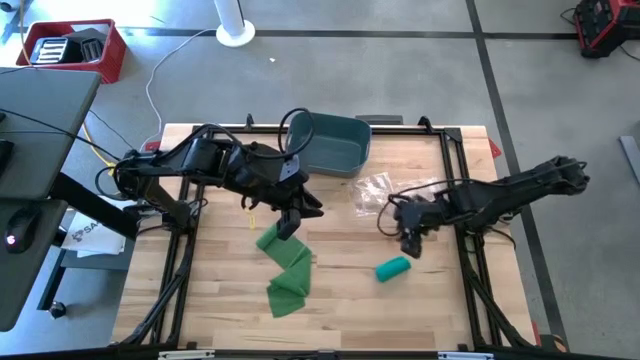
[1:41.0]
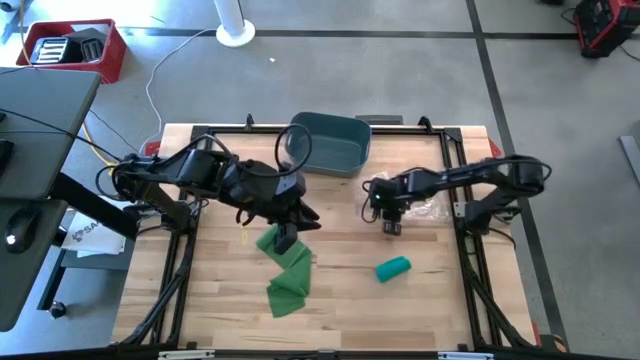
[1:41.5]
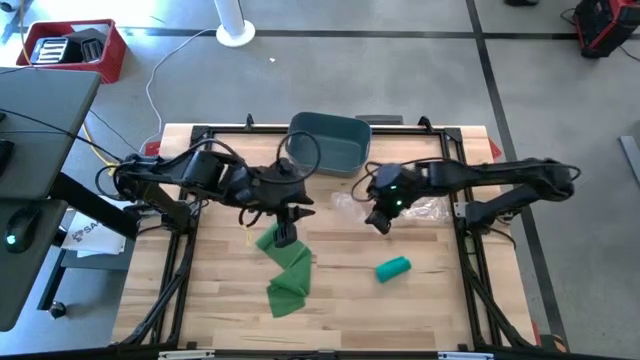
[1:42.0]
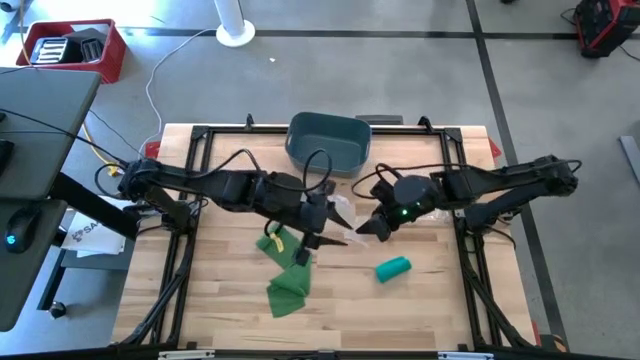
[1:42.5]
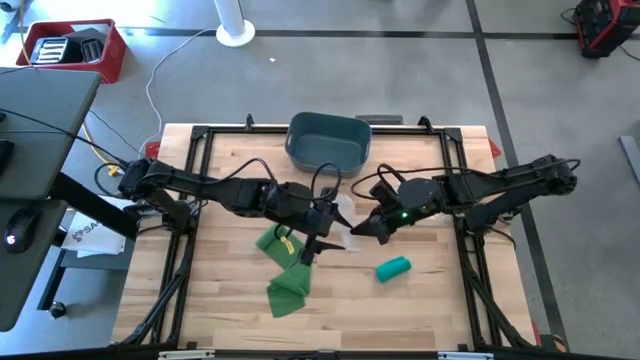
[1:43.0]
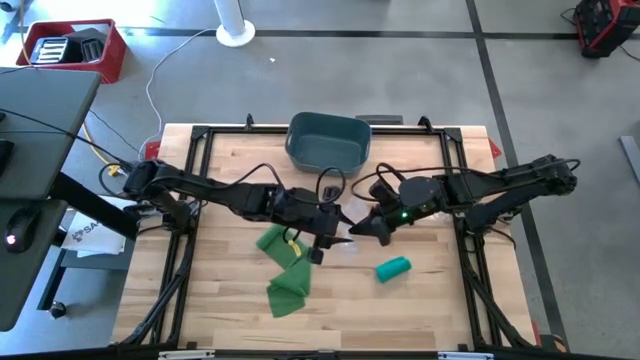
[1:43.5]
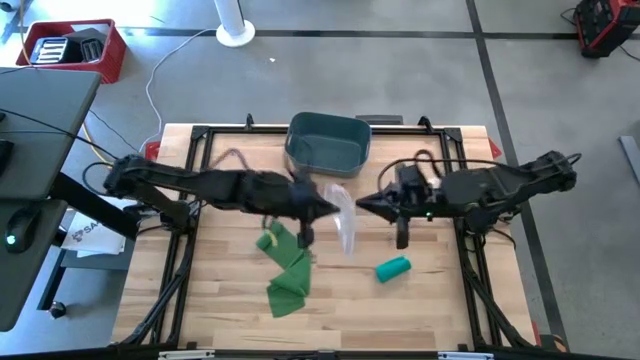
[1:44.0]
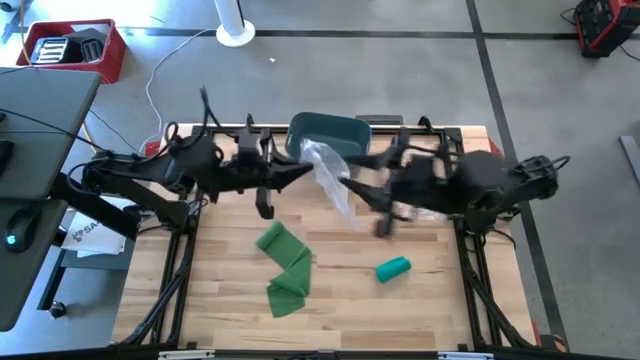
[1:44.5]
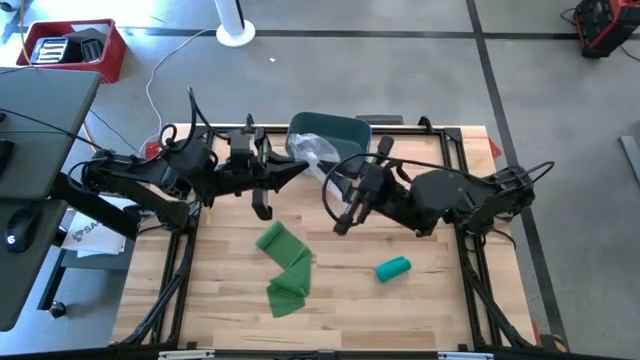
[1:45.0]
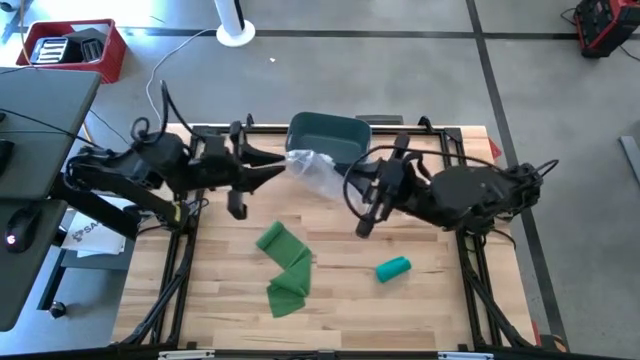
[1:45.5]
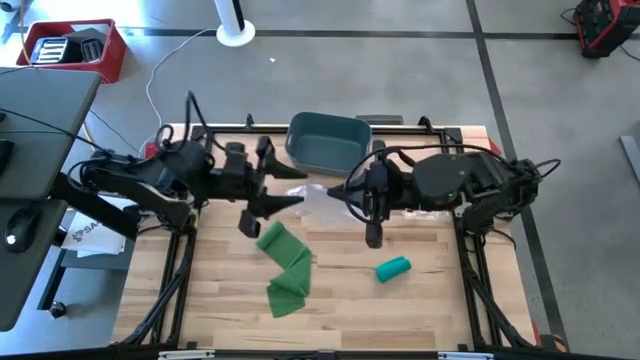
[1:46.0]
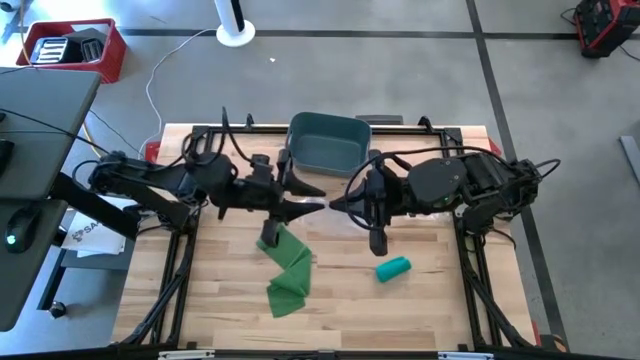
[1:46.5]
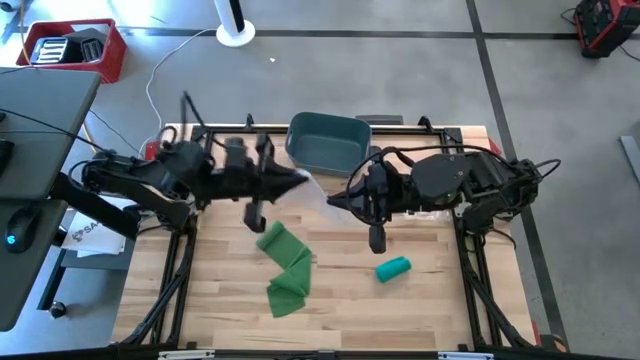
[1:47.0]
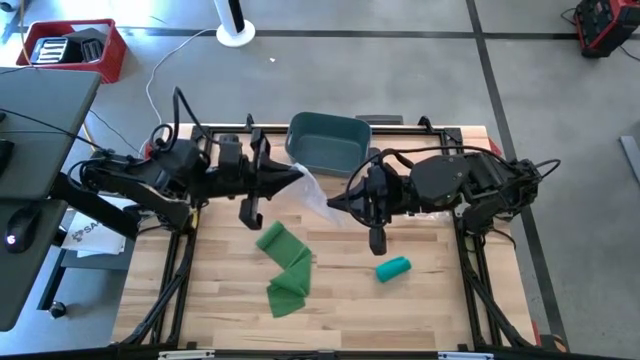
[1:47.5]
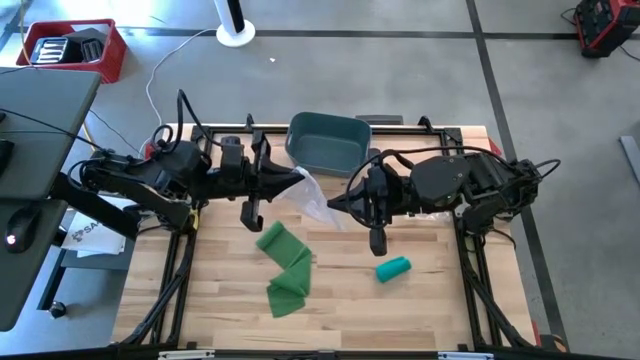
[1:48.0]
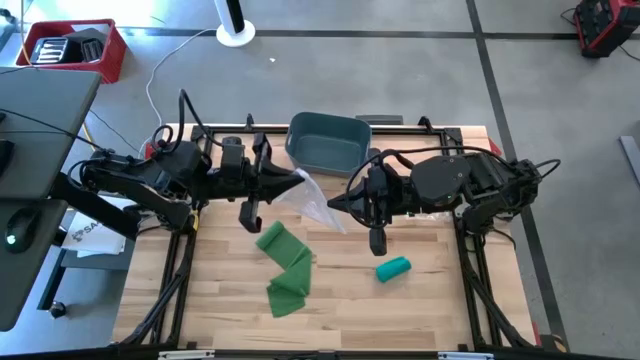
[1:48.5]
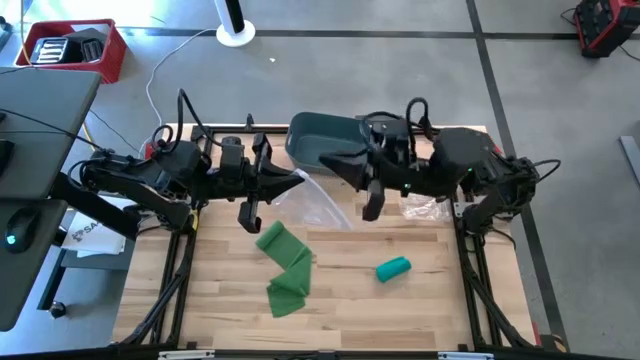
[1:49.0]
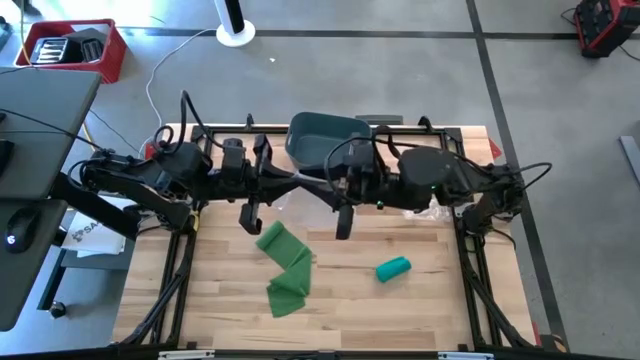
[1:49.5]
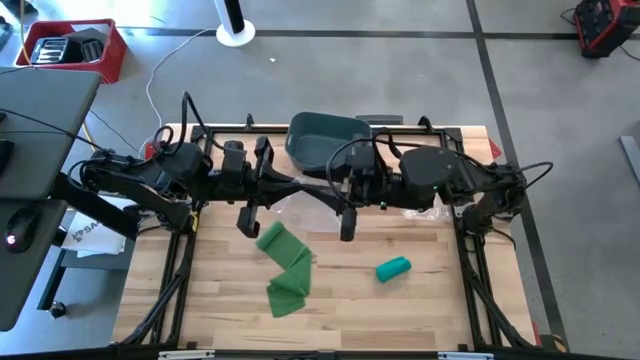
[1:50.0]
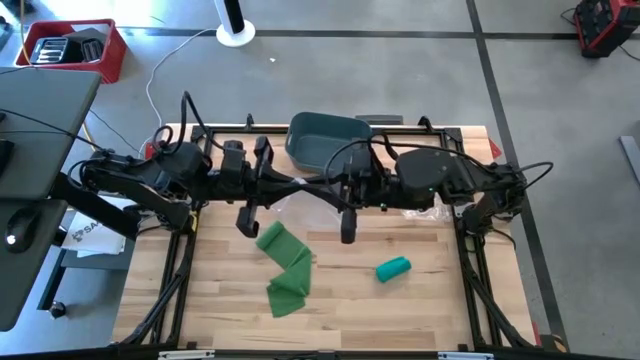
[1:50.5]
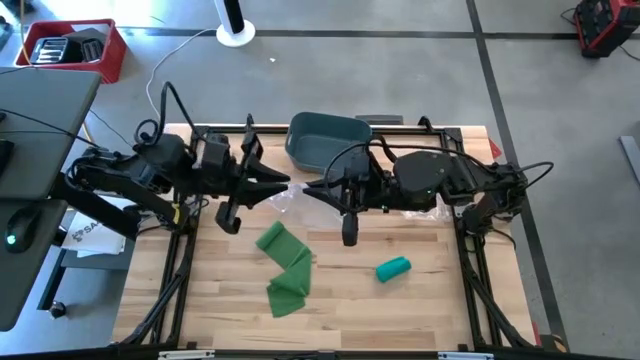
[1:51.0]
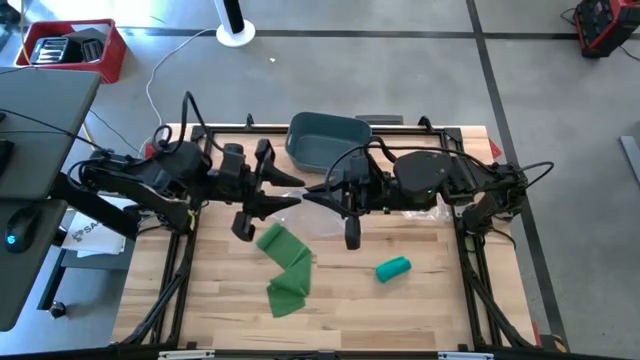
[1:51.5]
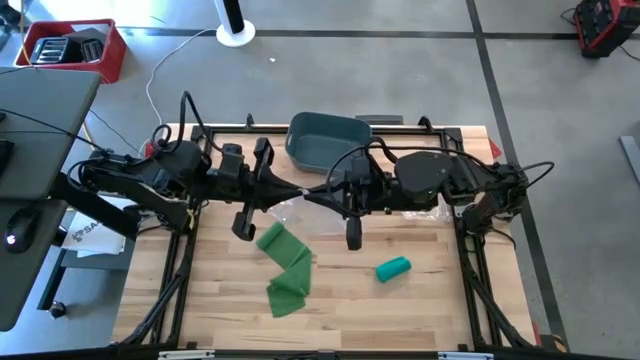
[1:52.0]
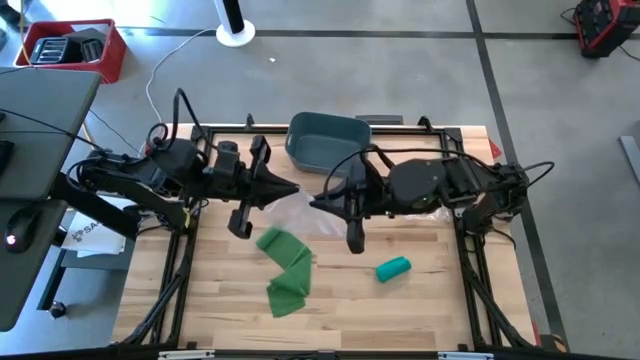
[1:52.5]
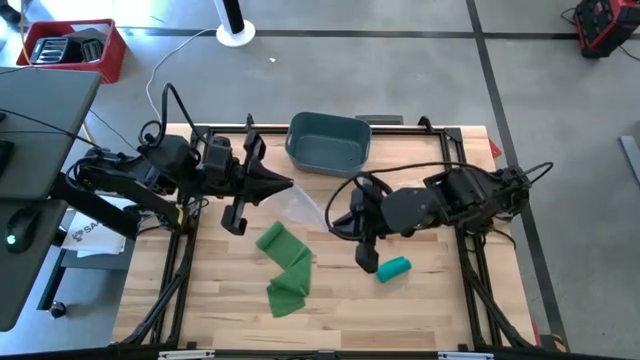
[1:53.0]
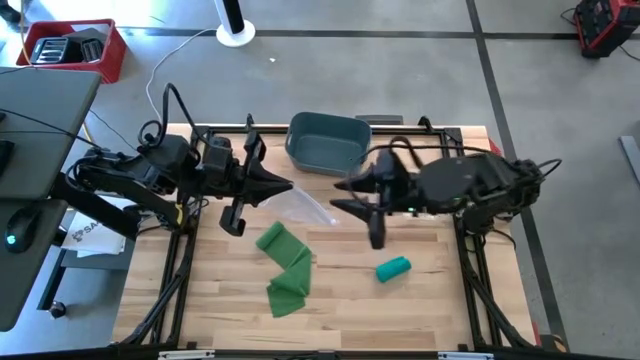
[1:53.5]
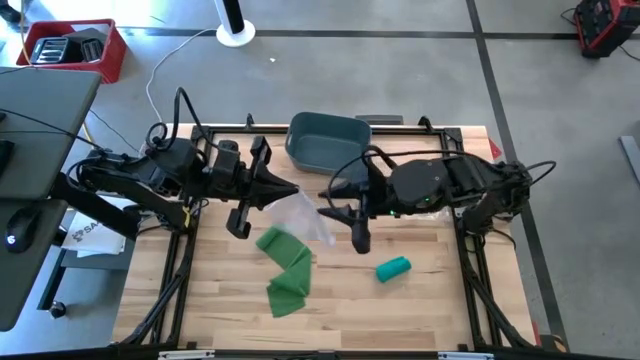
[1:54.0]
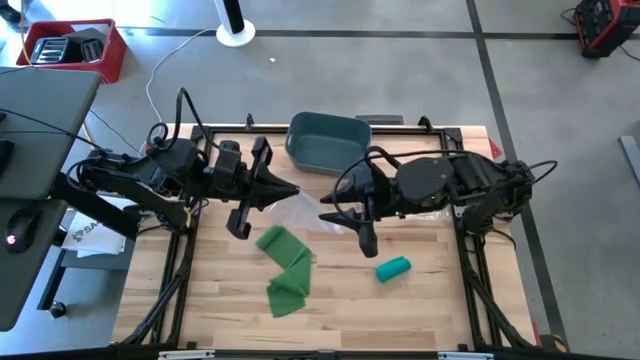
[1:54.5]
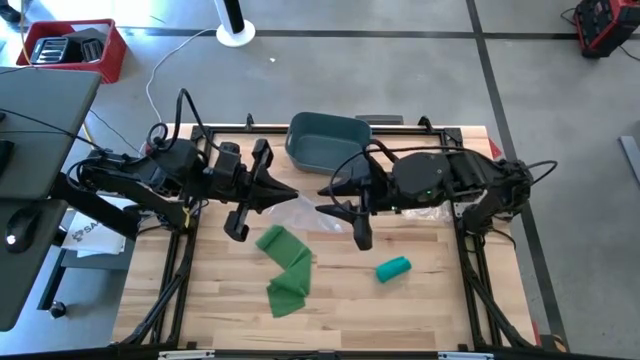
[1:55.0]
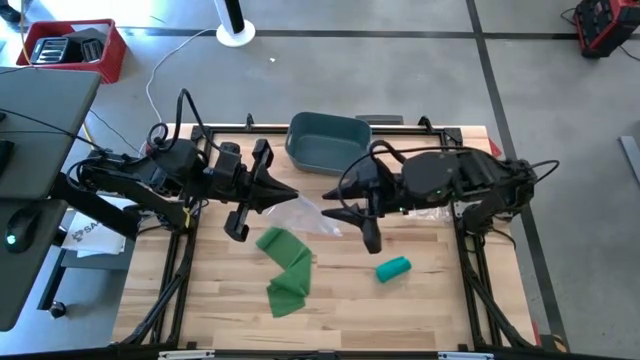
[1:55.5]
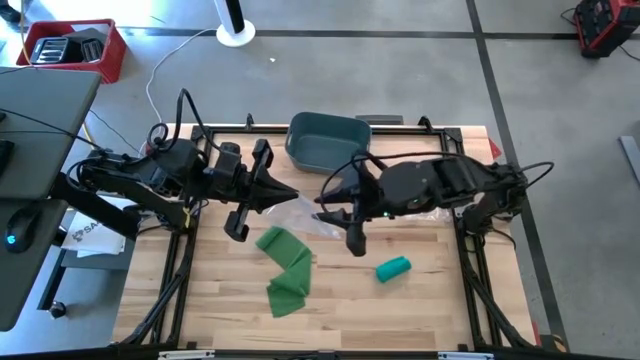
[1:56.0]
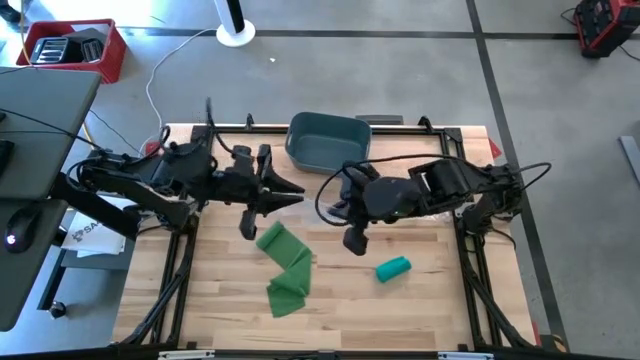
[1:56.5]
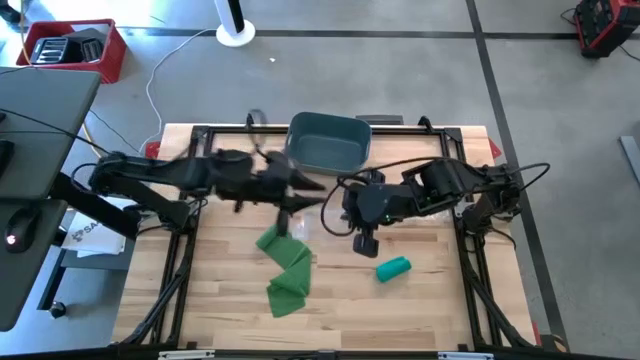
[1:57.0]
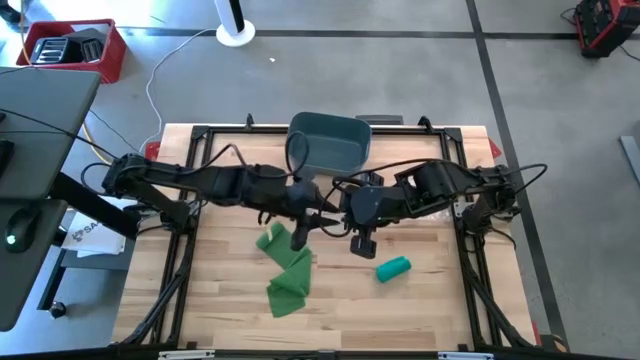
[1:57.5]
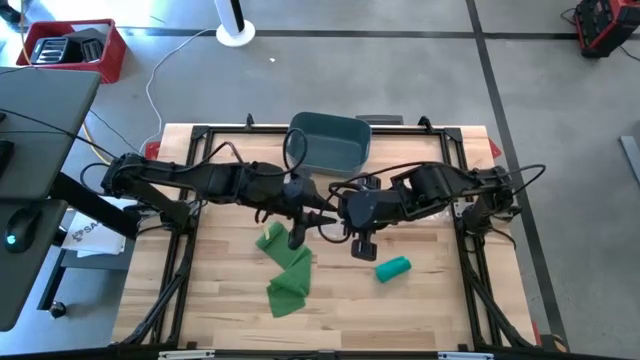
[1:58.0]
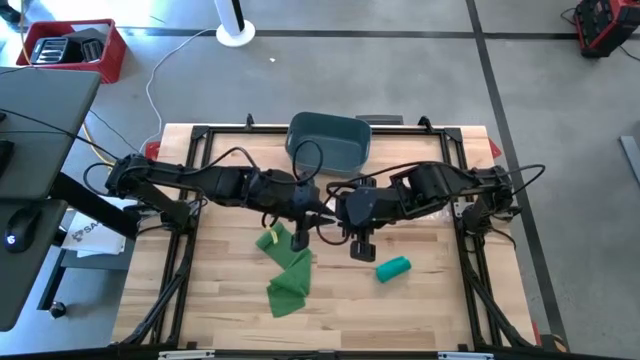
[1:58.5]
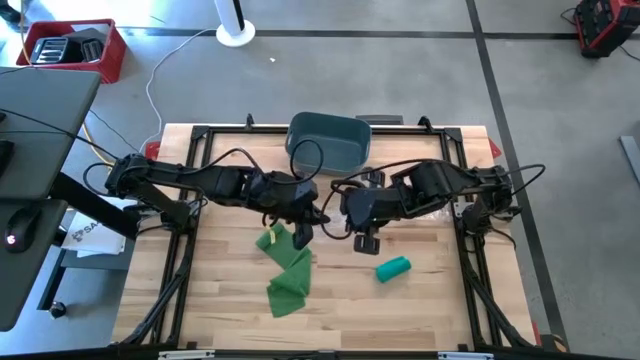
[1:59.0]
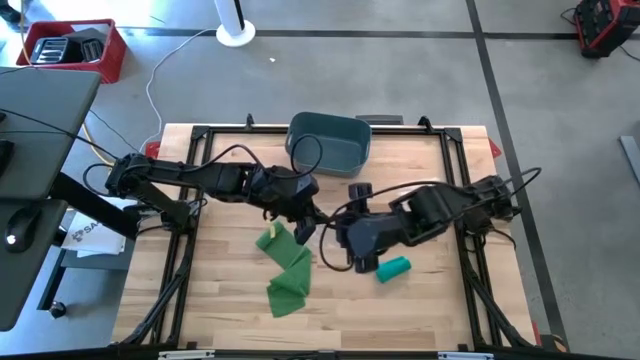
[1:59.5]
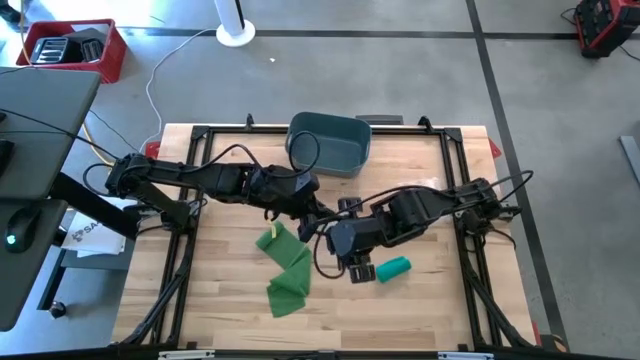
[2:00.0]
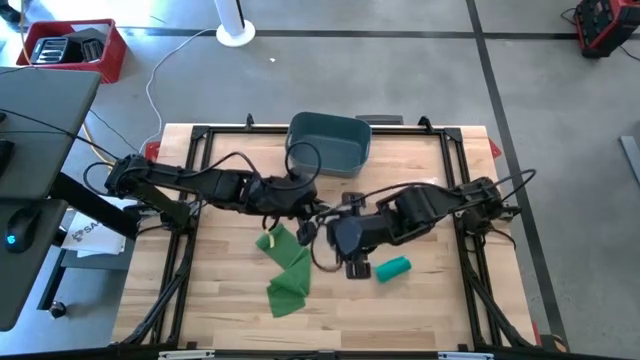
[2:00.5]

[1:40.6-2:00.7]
Task: Roll bandage
Open the left transparent zip bag
